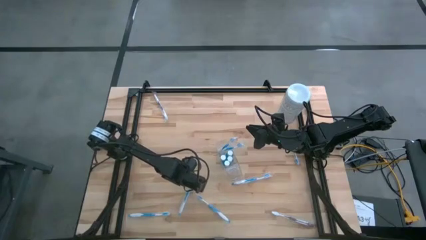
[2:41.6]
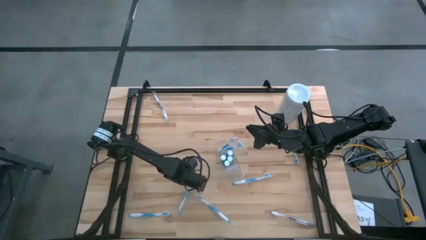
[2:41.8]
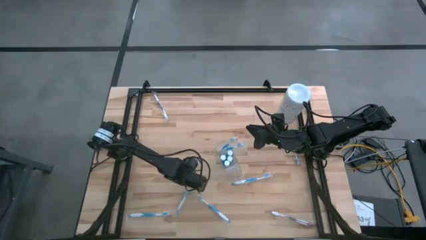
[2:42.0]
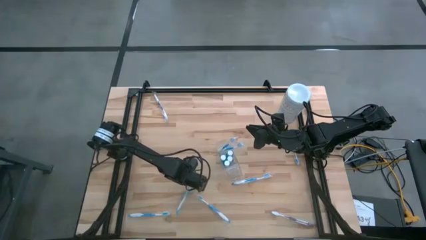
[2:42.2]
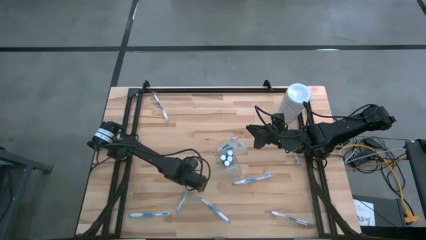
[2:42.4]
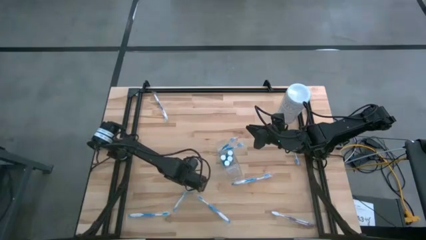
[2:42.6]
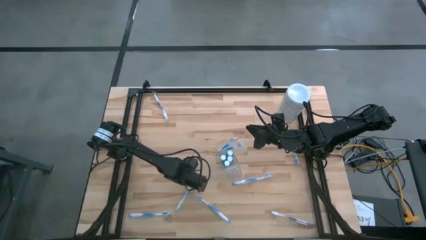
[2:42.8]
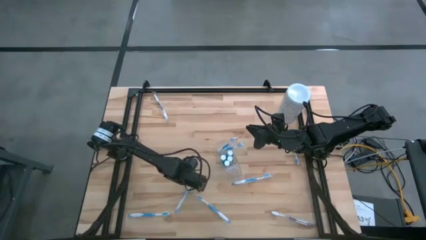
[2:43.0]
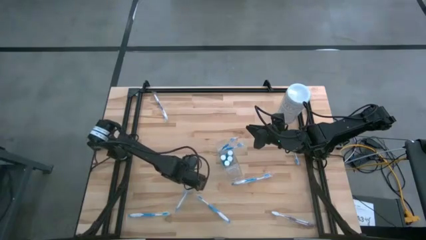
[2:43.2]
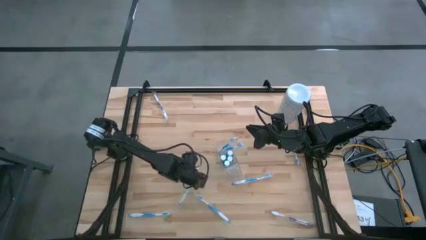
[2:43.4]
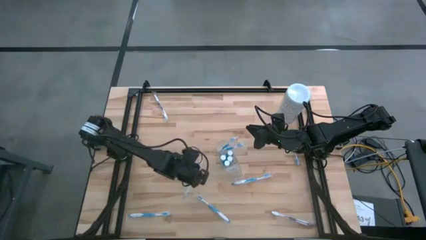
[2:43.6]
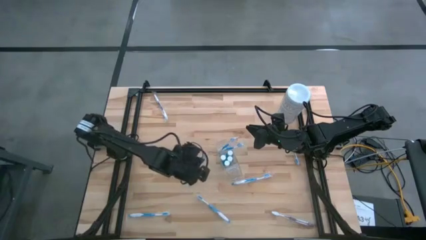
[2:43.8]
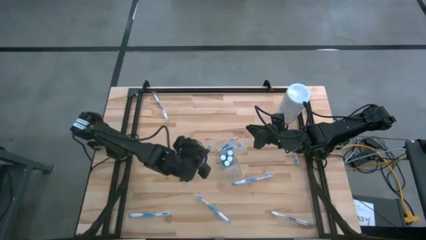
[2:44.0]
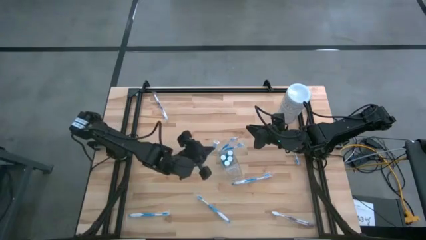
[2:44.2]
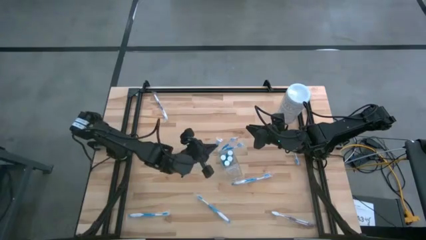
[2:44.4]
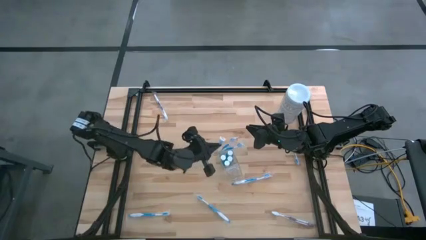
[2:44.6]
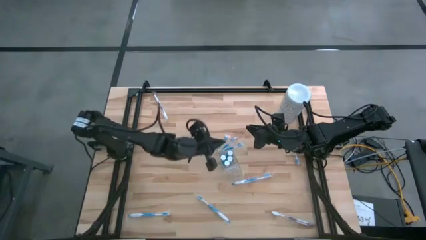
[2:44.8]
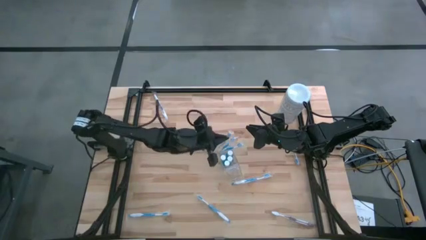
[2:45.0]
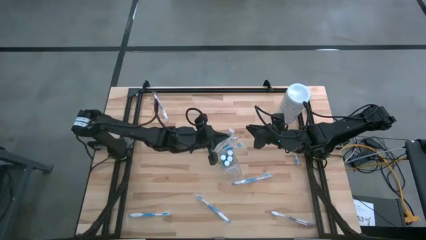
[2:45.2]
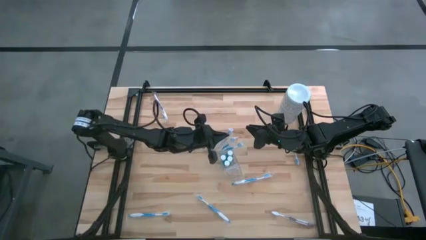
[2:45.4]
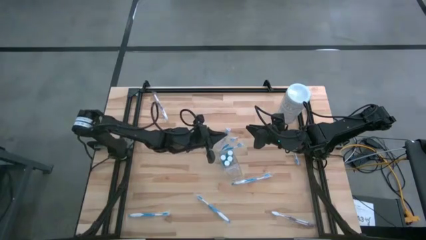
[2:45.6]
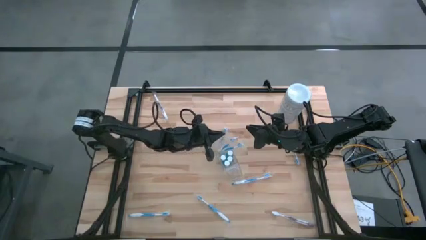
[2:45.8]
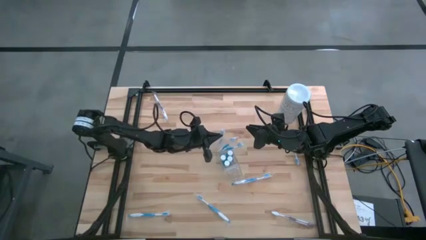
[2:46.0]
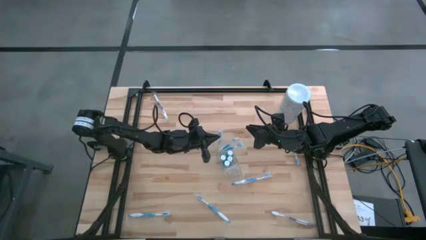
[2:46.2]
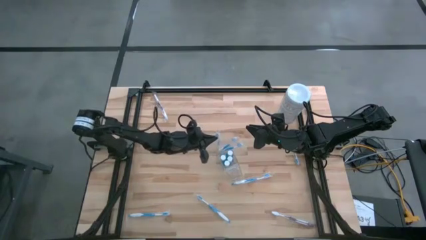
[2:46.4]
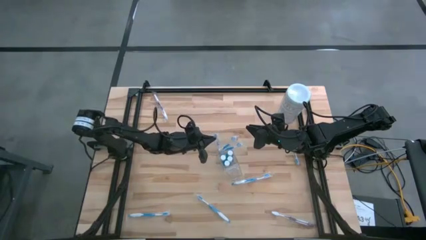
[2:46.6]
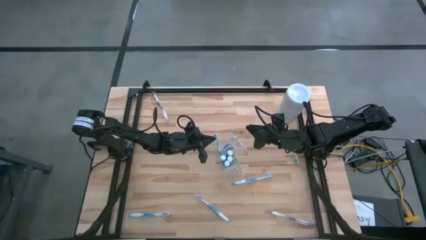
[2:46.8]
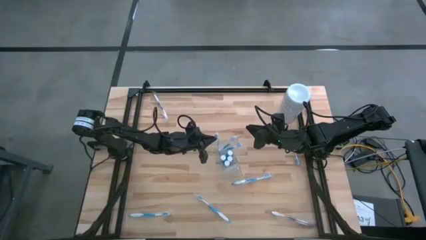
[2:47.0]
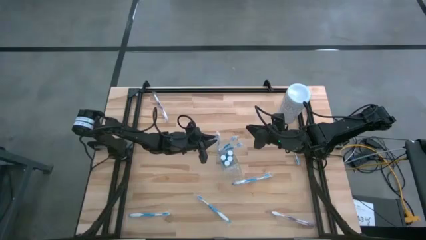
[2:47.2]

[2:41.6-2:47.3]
Task: Pick & Place toothbrushing station
Put the blue toothbrush into the left section of the transparent organizer

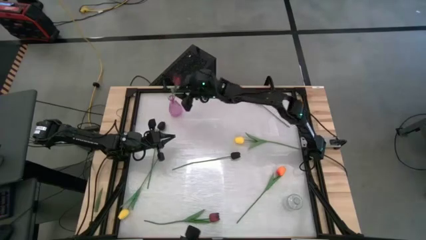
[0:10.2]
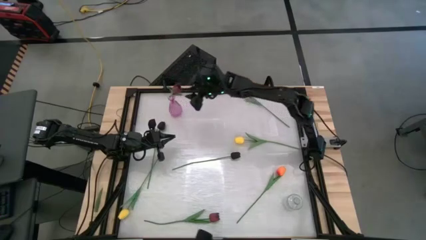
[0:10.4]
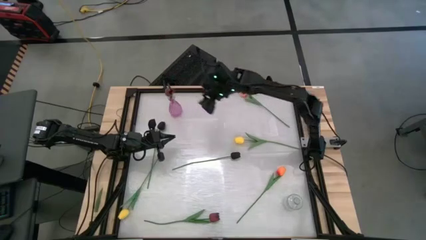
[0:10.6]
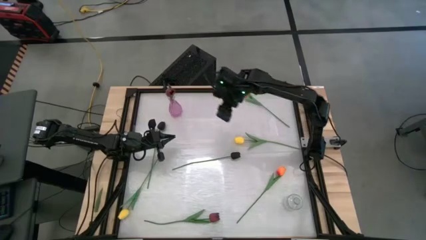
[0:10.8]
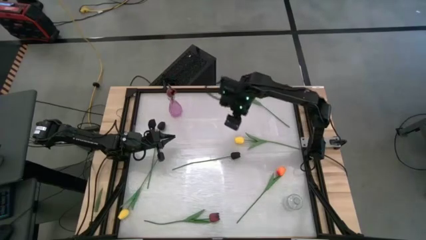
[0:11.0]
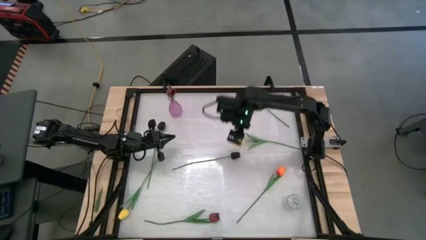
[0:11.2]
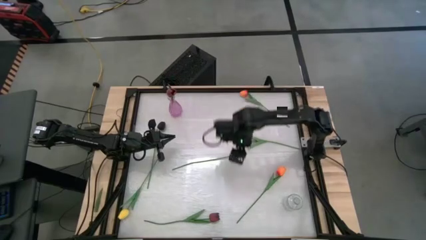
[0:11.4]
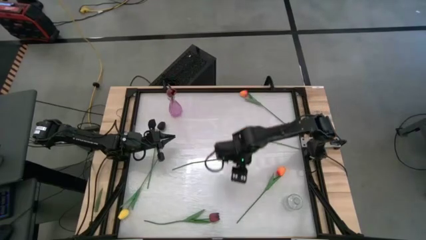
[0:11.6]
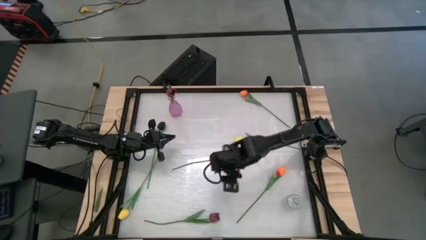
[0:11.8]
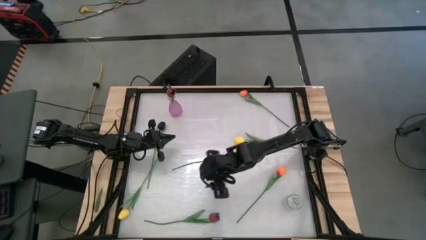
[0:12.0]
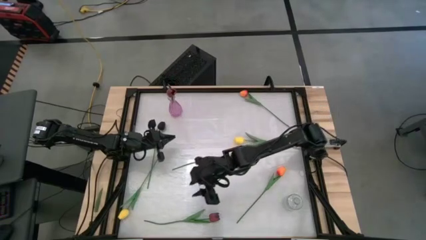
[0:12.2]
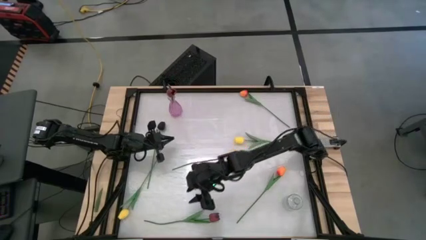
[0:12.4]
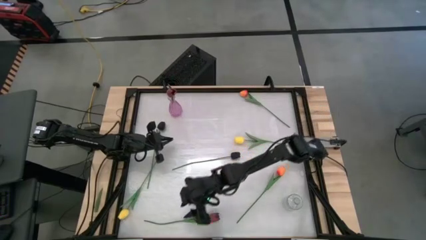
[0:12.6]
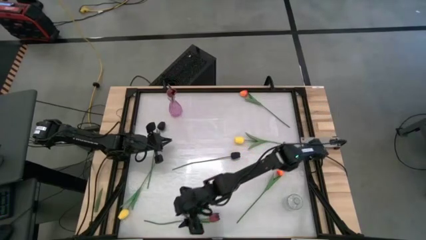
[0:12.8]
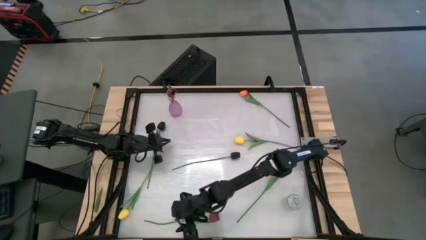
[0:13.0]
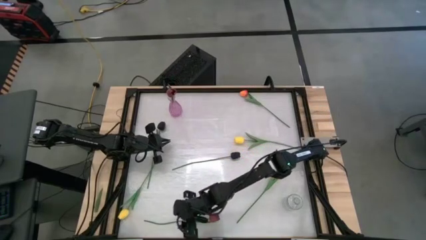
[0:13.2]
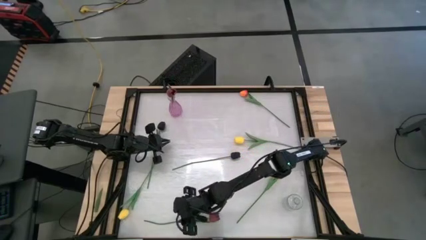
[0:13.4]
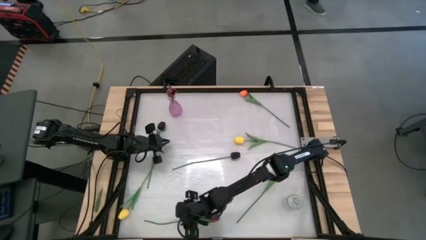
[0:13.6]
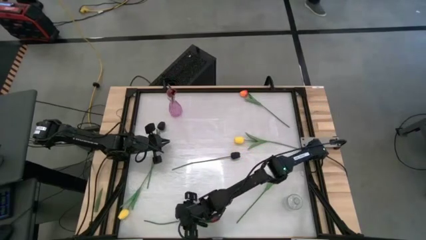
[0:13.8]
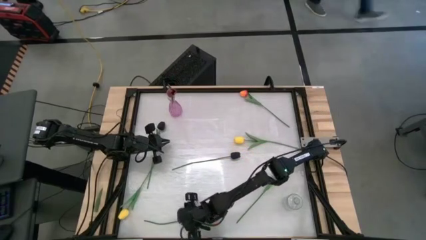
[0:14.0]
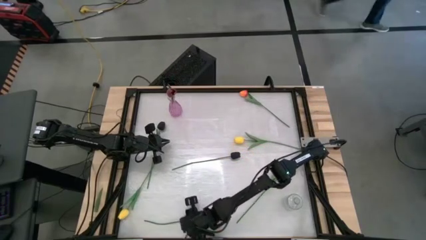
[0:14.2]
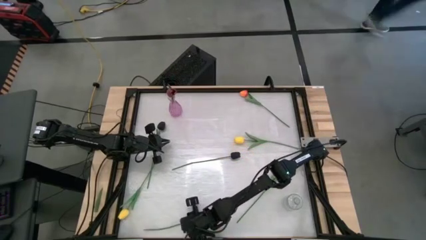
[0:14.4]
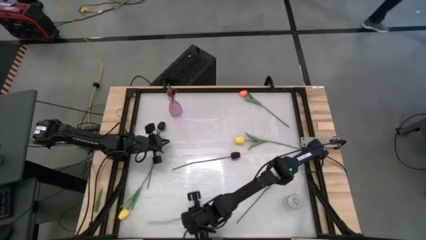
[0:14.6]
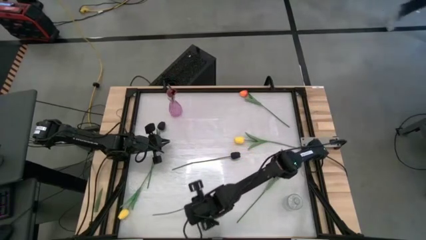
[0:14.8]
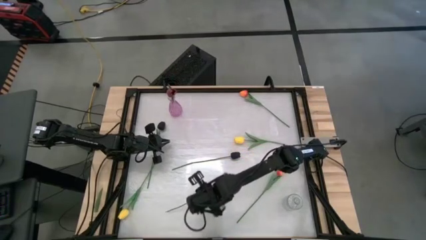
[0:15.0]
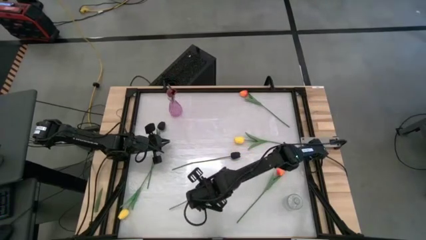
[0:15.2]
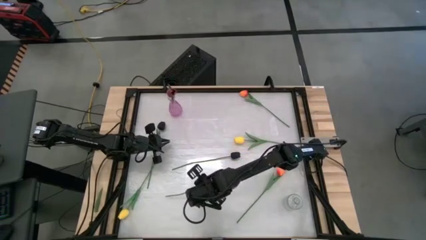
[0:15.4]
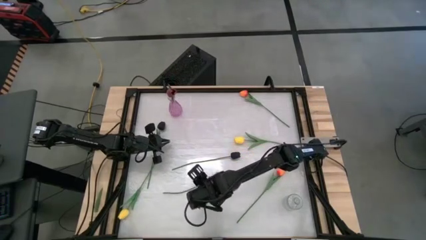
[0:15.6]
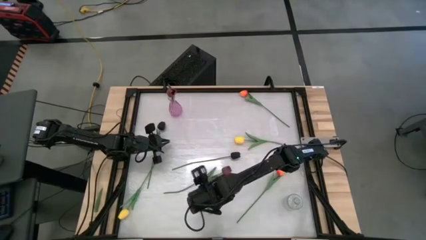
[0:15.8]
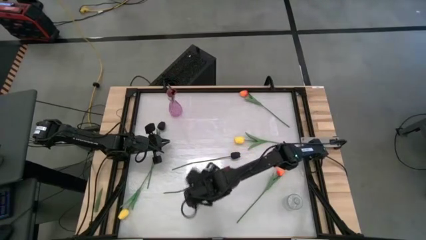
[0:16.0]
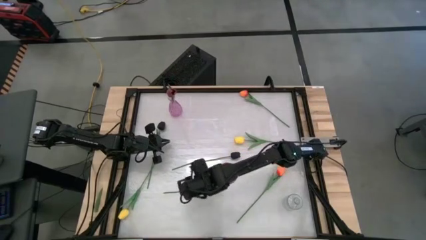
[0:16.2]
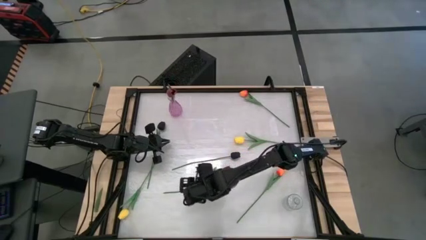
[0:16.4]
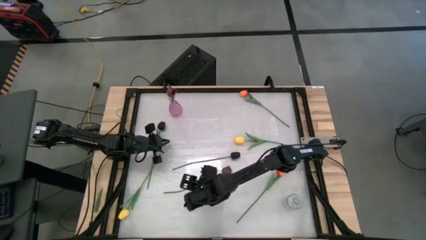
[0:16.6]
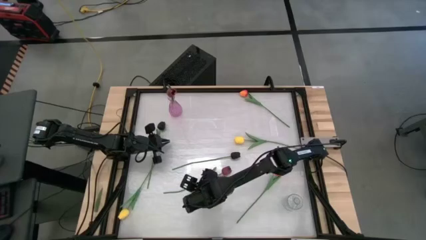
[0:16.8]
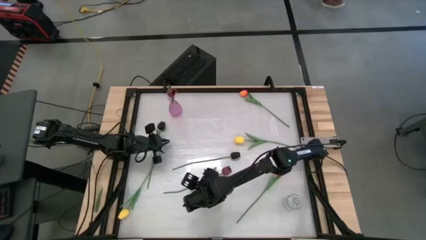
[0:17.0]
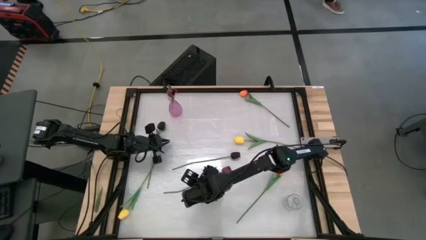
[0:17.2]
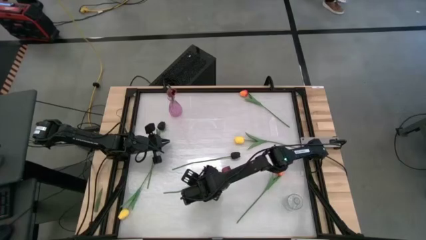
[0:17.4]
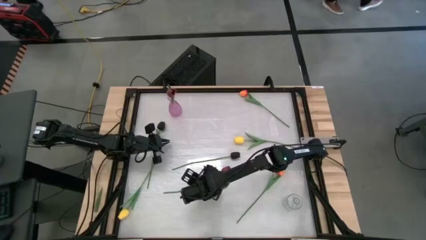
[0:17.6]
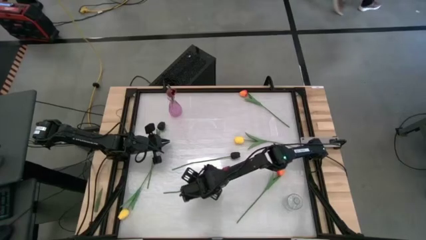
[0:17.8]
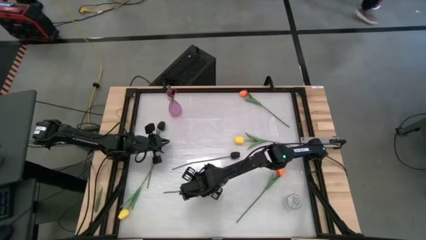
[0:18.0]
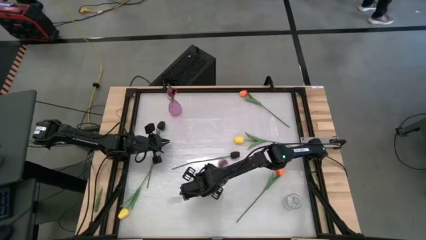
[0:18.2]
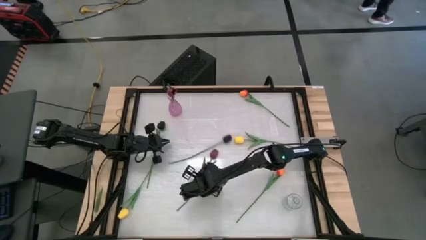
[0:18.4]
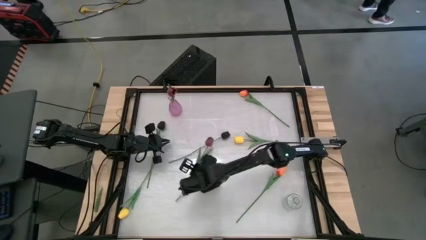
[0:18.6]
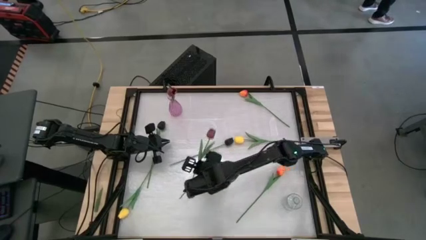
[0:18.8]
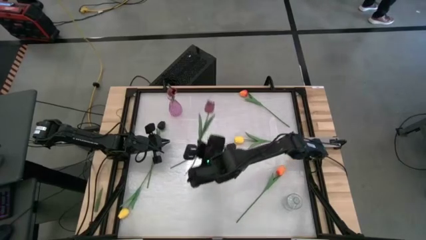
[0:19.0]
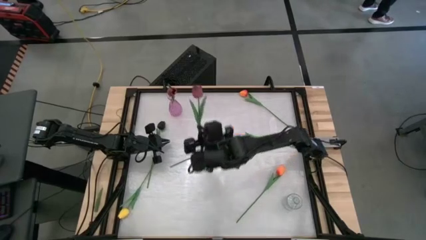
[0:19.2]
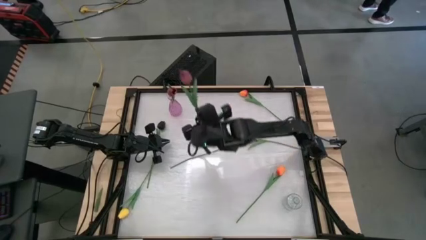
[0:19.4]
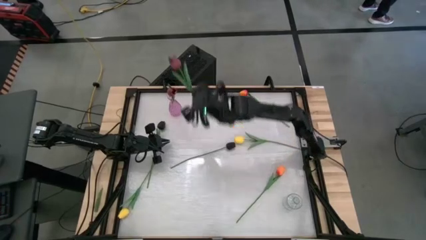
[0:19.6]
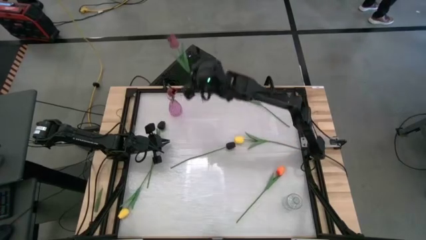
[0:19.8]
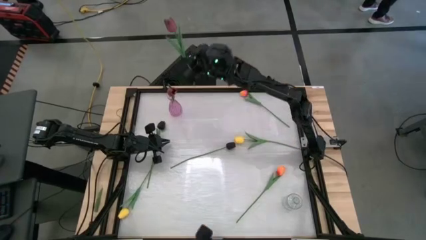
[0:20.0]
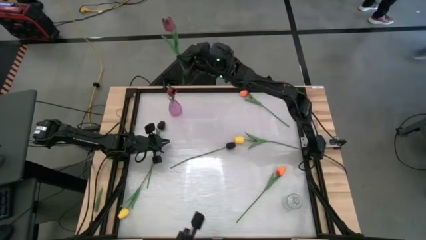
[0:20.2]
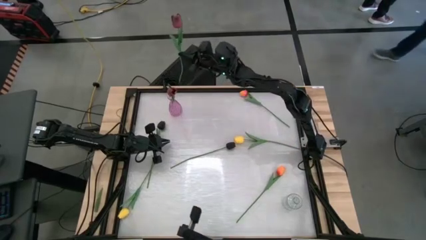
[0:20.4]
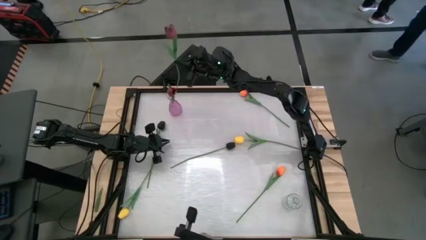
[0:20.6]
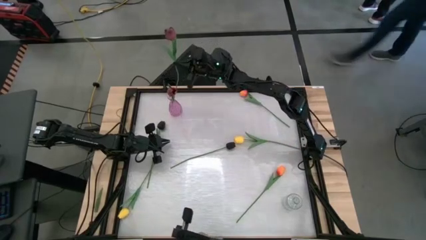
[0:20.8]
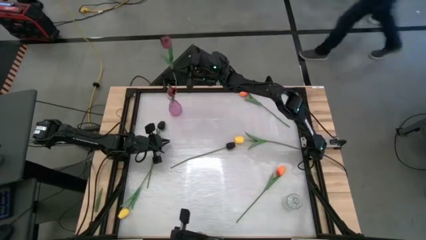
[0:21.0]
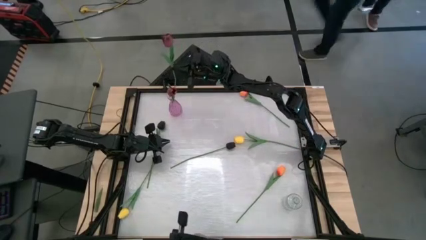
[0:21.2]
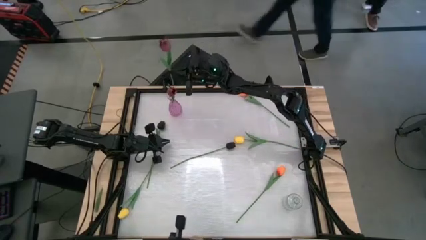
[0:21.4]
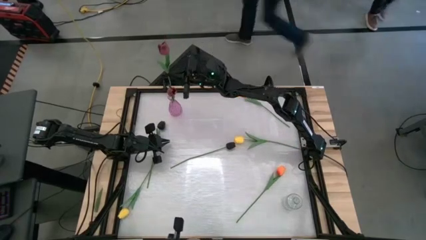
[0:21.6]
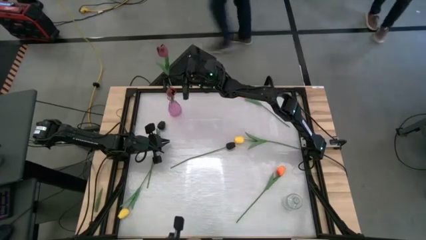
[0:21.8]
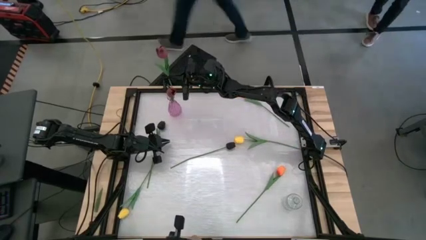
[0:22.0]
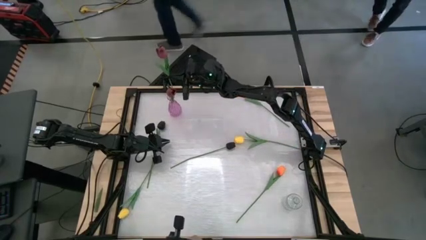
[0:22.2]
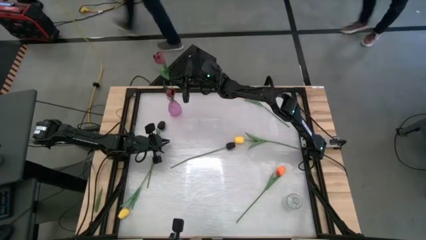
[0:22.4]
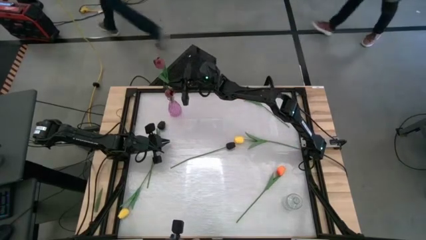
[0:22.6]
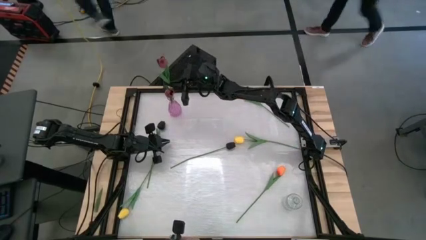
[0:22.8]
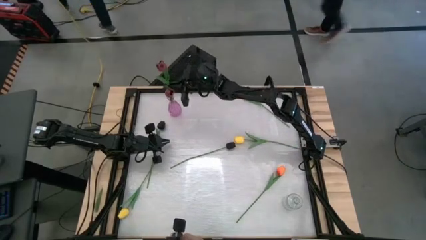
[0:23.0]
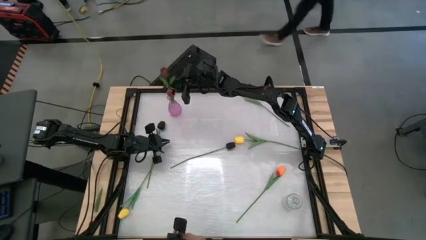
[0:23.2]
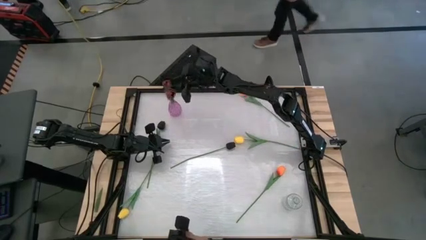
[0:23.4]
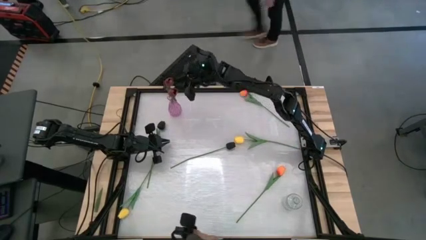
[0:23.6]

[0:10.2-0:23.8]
Task: Sort flowers into vase by color
Put the red flower into the purple vase
